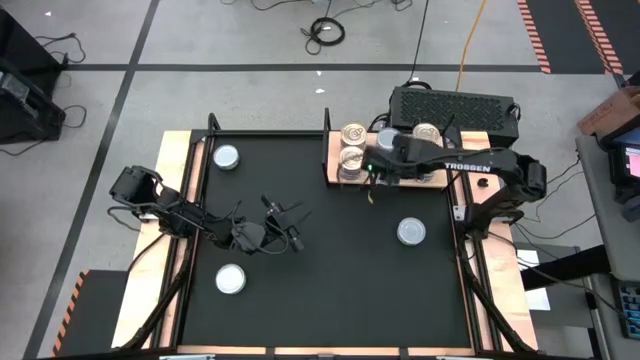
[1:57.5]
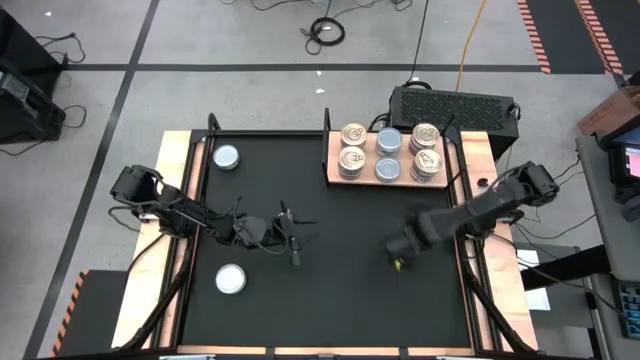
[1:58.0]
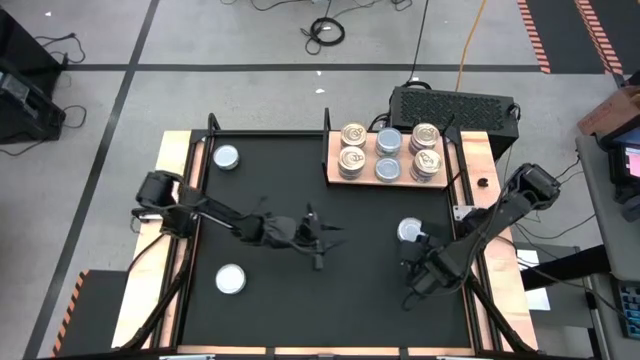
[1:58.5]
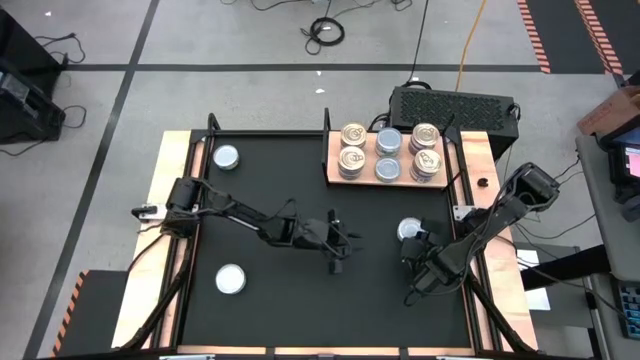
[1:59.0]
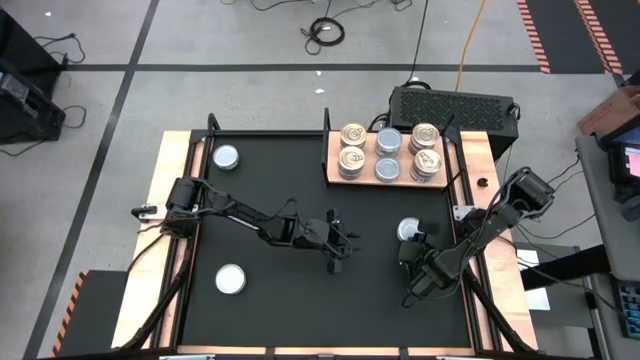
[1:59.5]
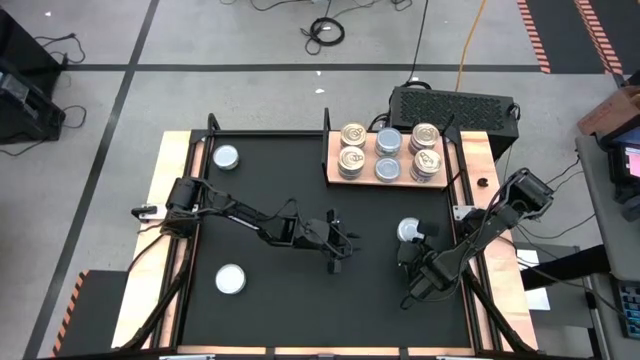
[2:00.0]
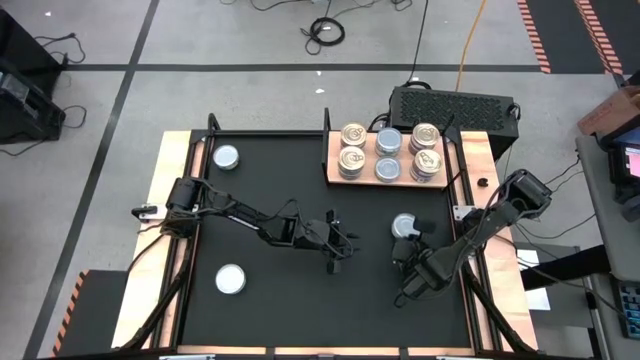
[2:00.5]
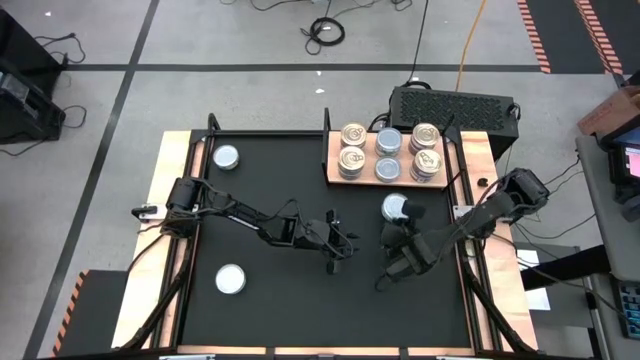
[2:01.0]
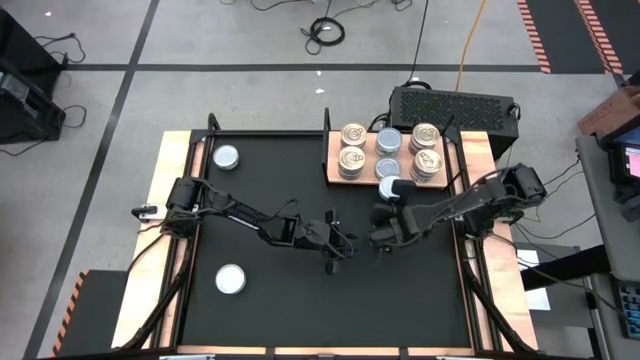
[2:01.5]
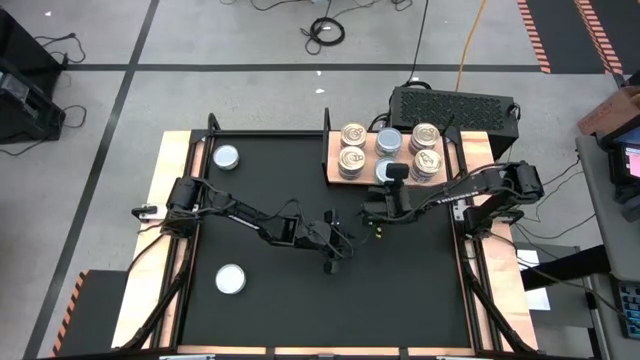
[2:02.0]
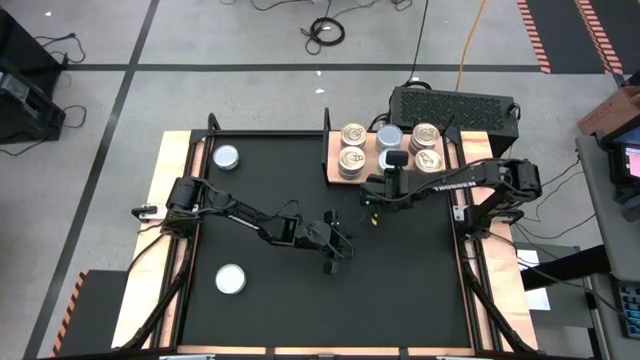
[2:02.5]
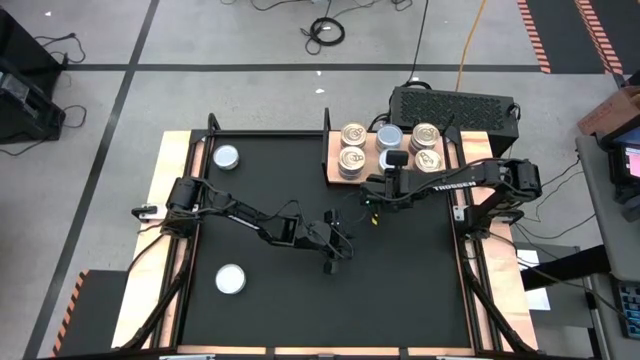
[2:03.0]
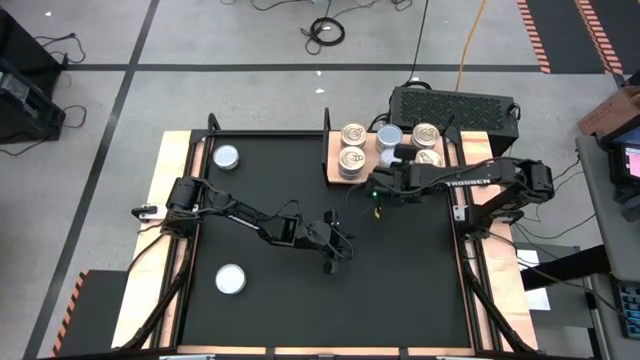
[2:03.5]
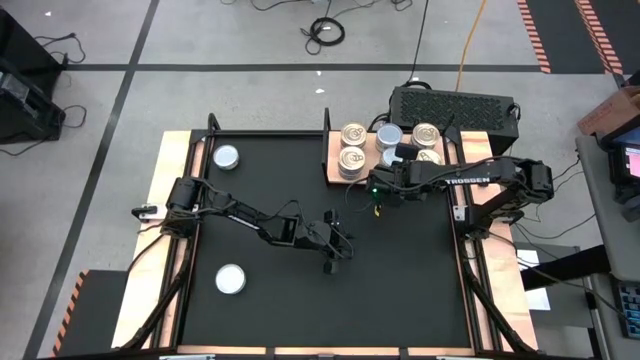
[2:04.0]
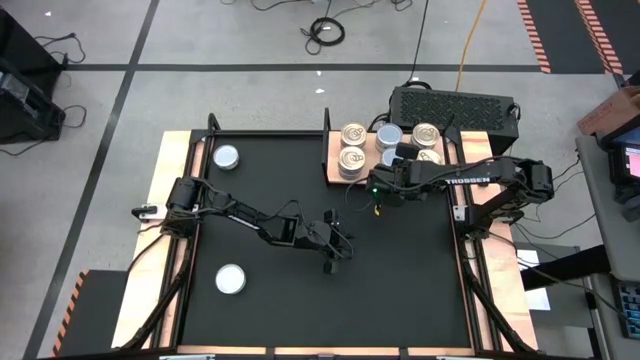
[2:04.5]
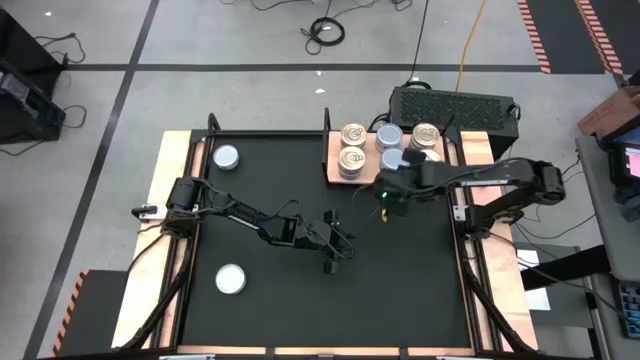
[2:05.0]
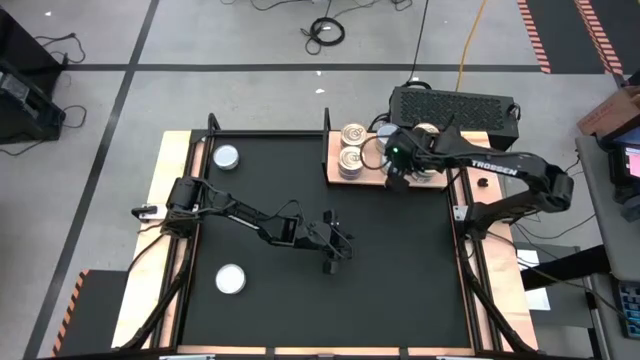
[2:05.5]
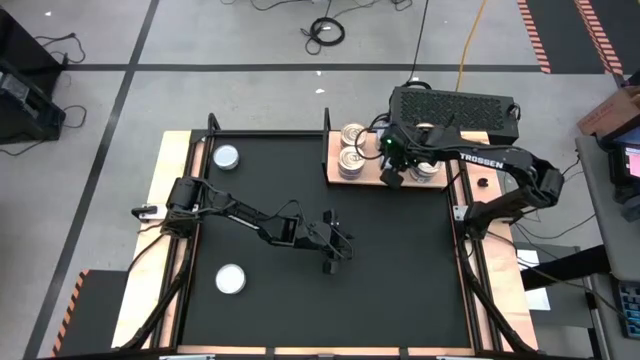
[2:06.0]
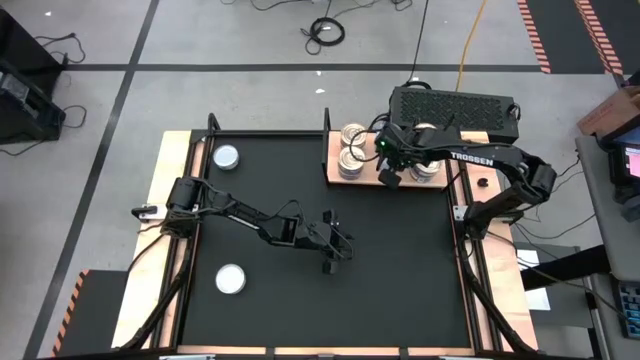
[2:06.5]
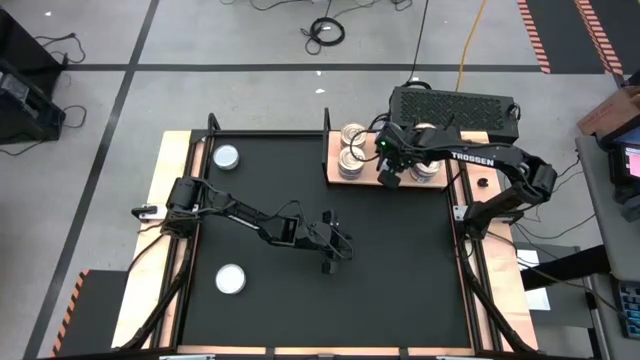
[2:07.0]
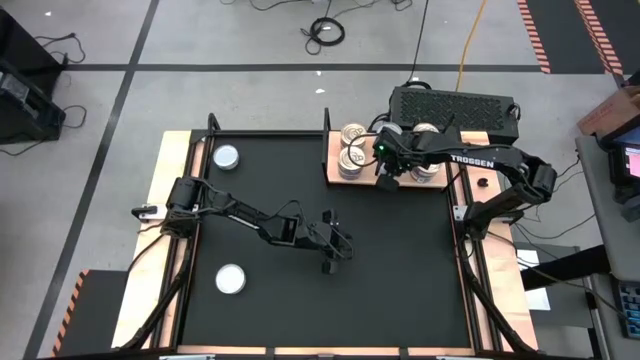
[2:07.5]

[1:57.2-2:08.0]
Task: Stack canned seafood by type on shelf
Stack the green tuna can on top of the bottom green tuna can on the shelf

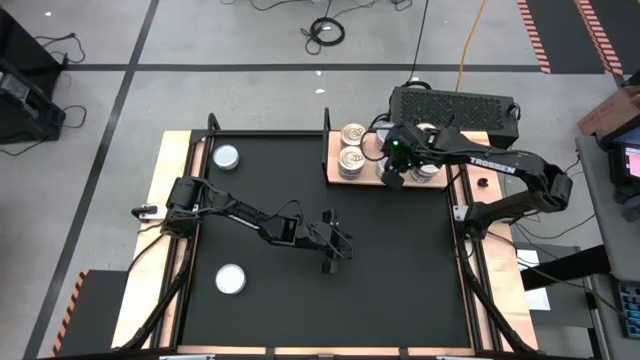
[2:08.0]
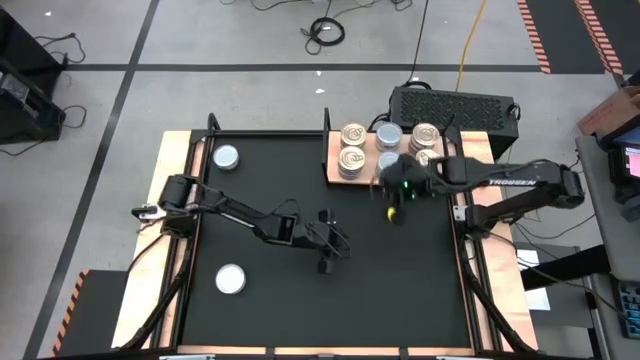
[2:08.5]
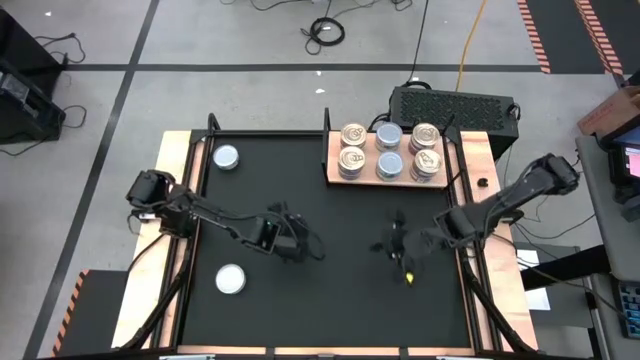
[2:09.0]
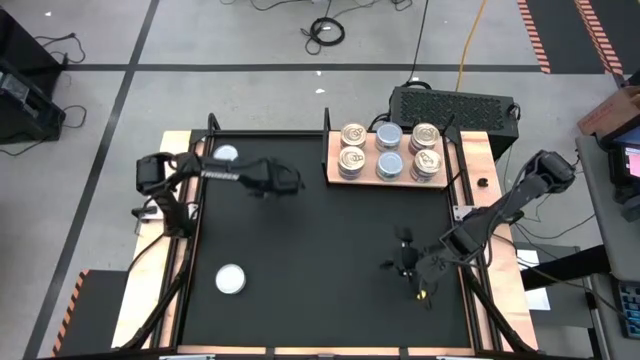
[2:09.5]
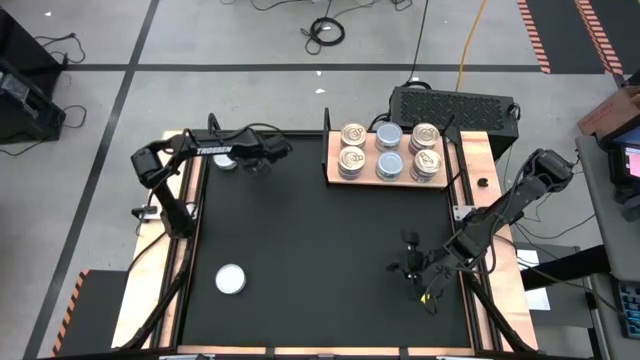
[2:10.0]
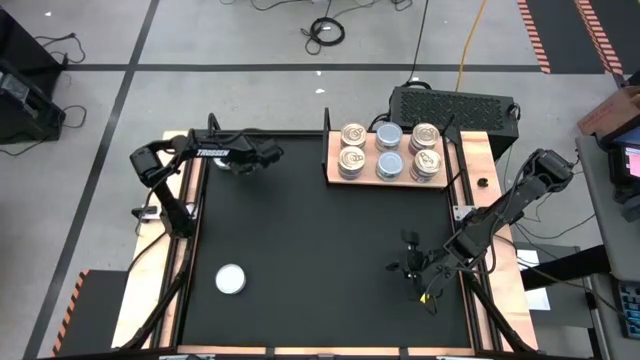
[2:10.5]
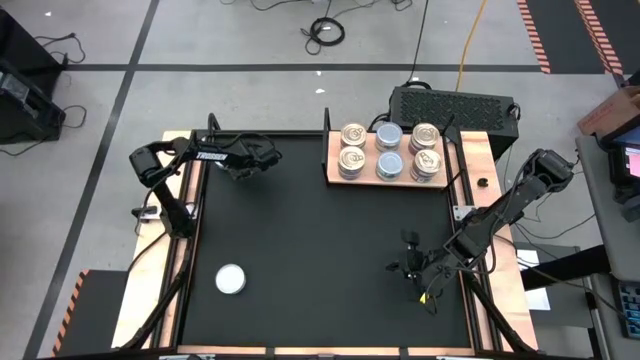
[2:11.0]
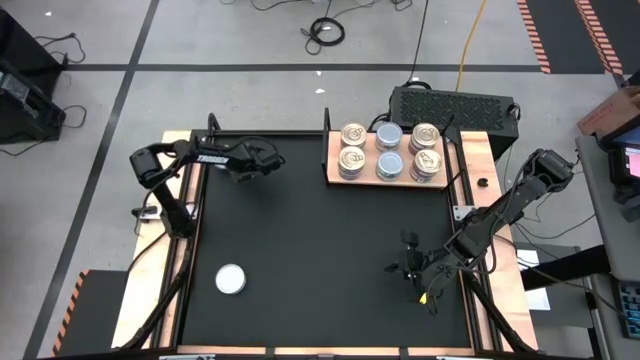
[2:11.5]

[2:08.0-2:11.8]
Stack the green tuna can on top of the top green tuna cans on the shelf

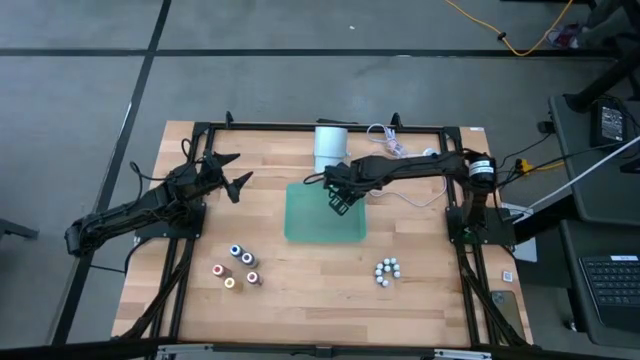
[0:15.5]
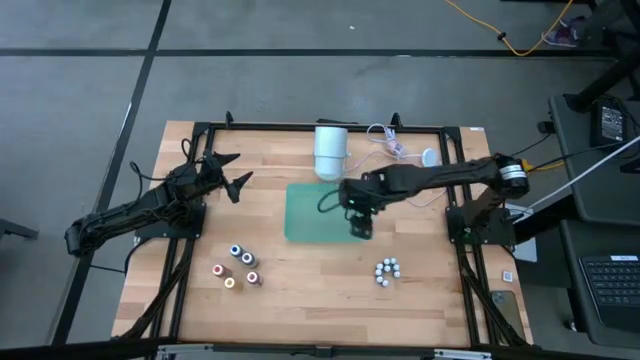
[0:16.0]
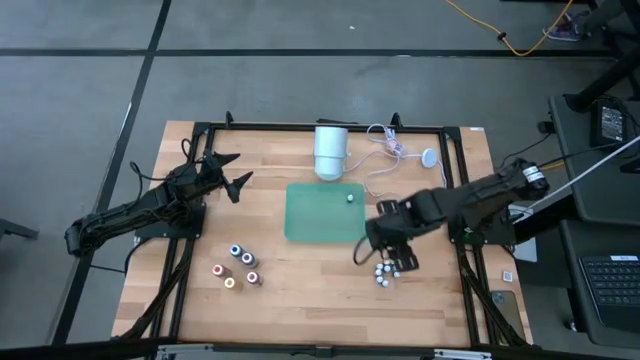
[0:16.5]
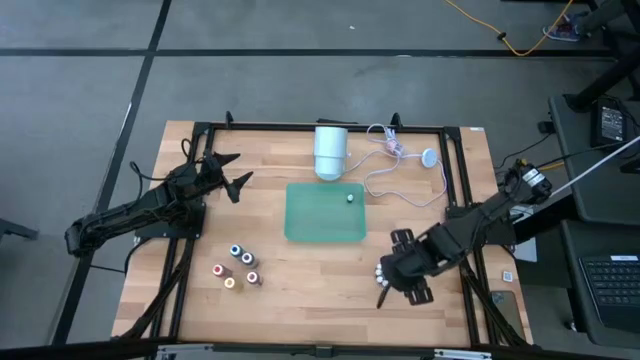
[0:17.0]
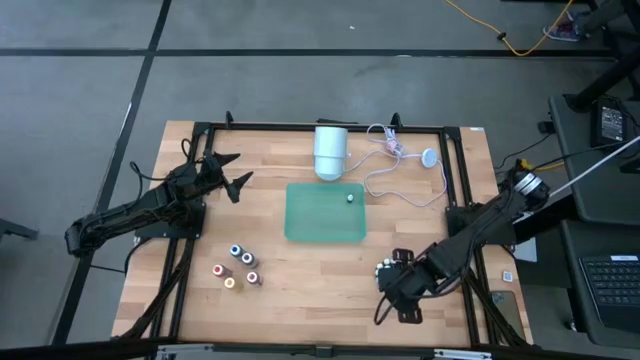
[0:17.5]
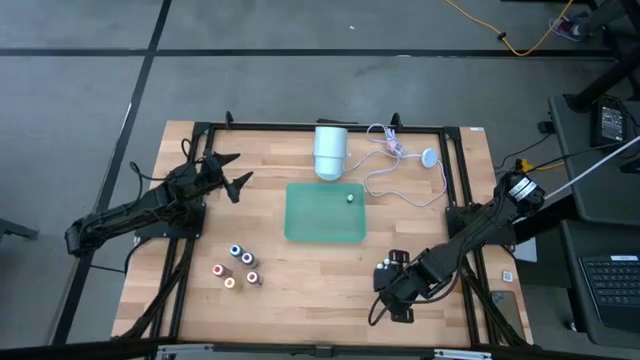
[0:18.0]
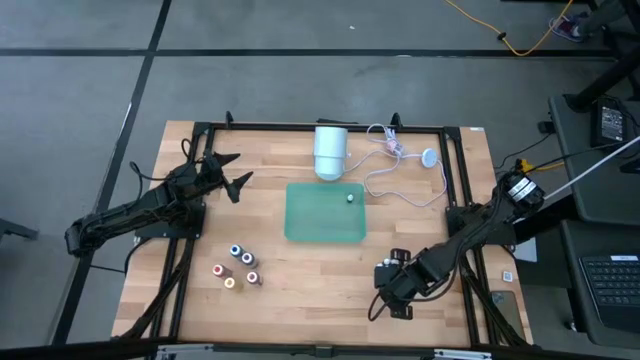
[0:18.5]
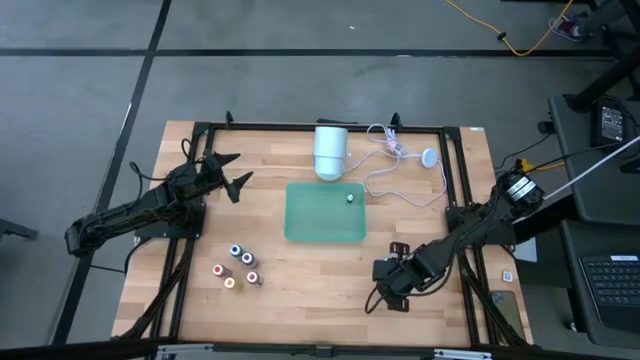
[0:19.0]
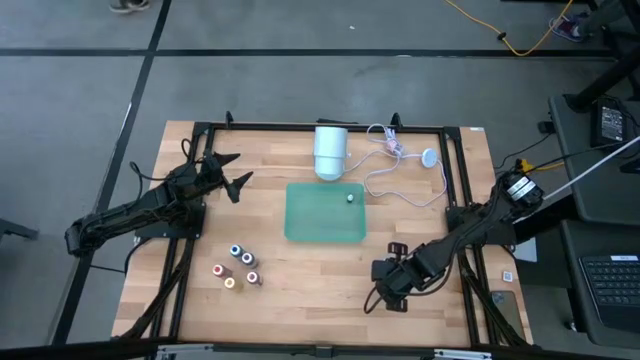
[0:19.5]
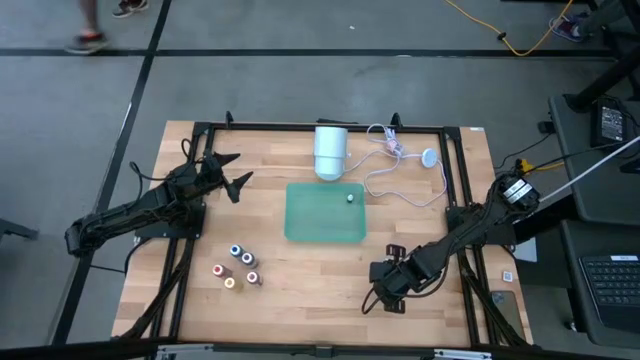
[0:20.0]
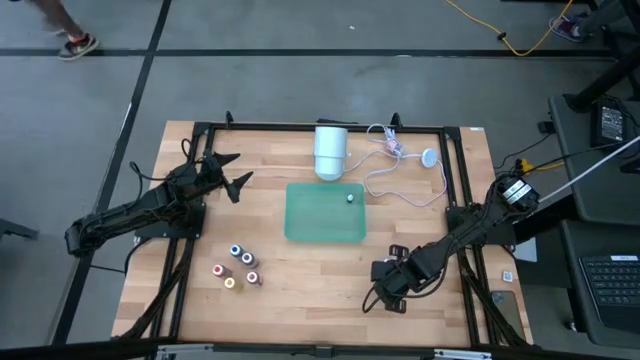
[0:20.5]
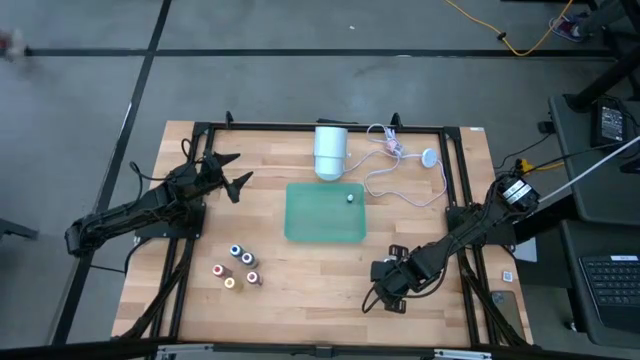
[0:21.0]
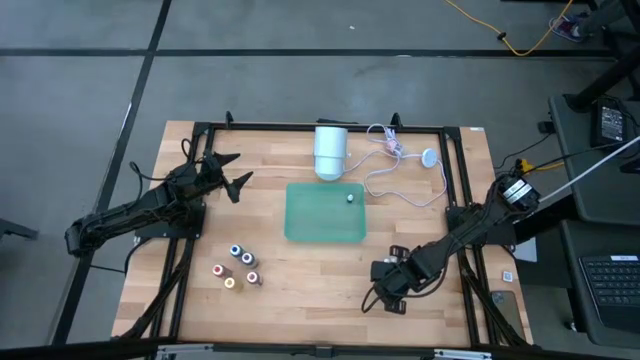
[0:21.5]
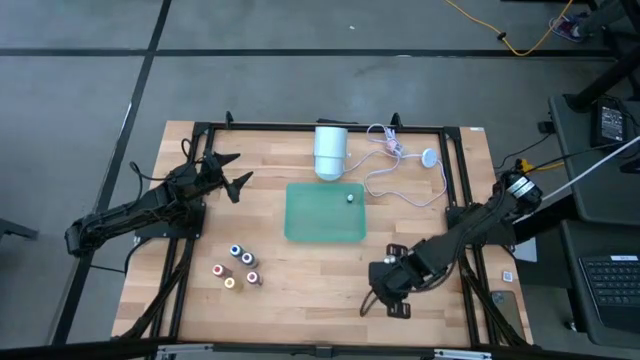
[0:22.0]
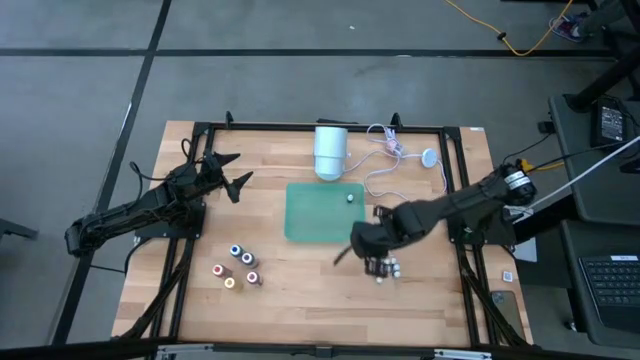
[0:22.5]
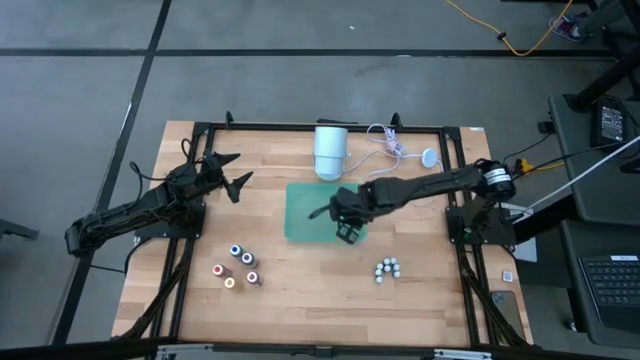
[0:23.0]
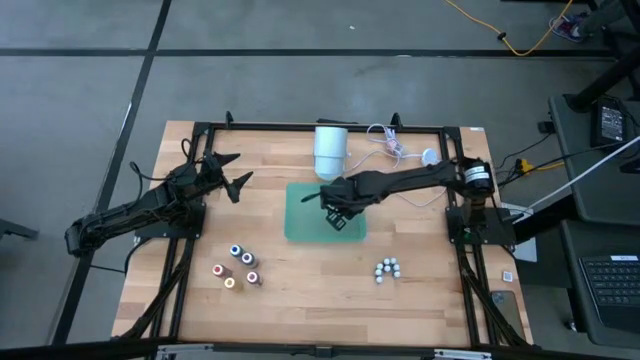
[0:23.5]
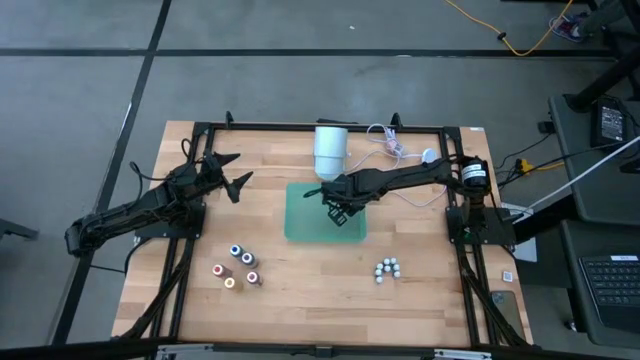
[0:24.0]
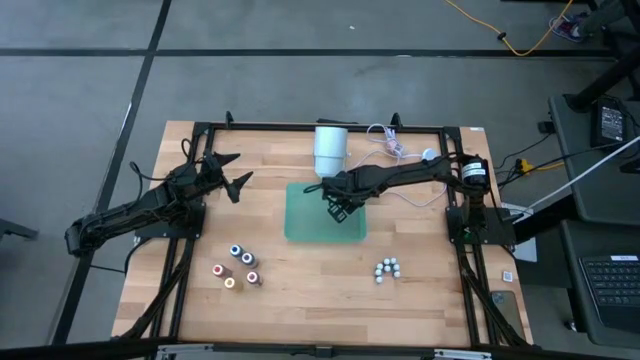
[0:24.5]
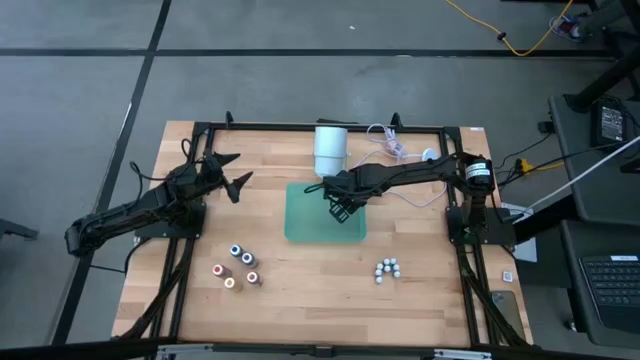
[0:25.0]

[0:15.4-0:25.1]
Task: Pick & Place food coloring
Put the bottom right small red food coloring bottle into the green bin
